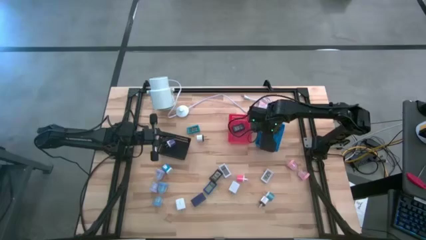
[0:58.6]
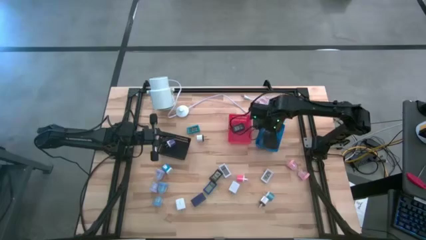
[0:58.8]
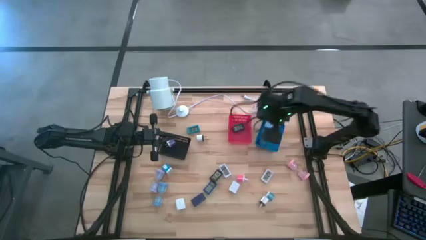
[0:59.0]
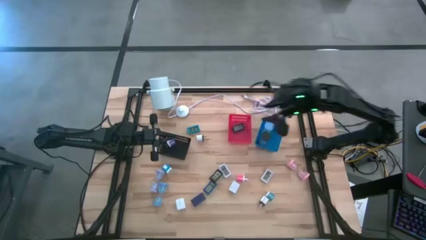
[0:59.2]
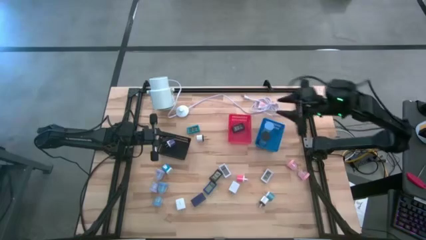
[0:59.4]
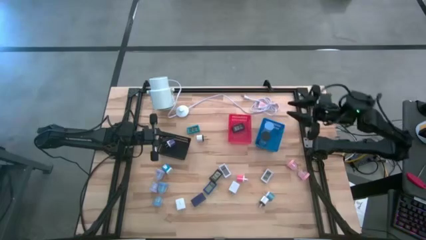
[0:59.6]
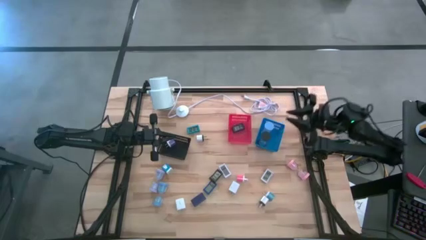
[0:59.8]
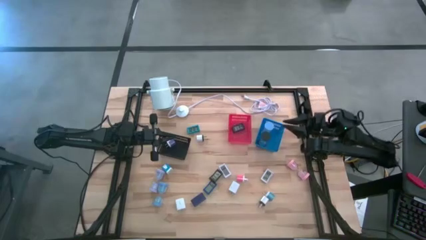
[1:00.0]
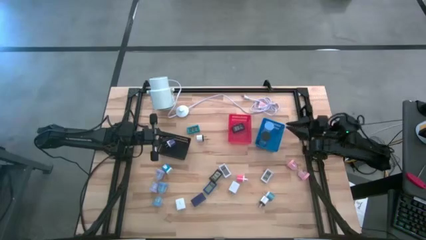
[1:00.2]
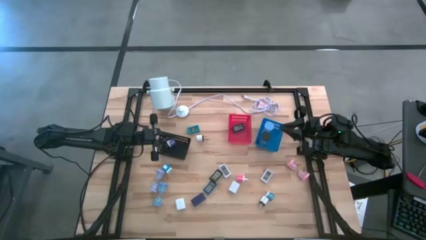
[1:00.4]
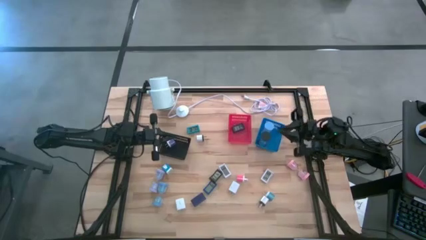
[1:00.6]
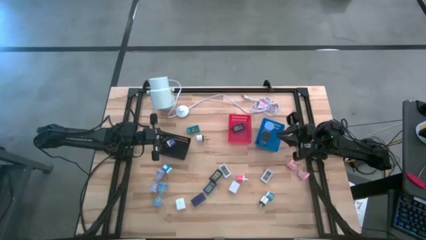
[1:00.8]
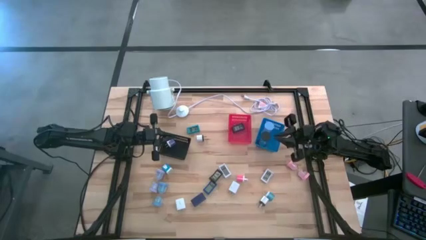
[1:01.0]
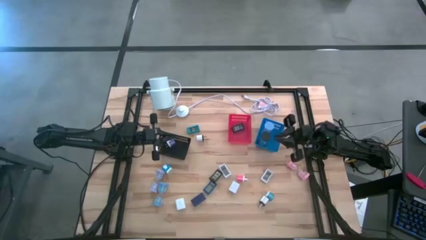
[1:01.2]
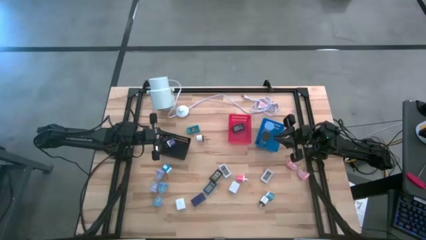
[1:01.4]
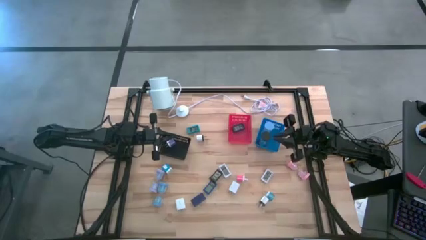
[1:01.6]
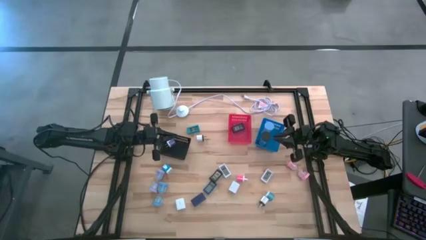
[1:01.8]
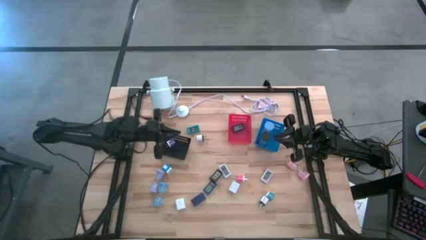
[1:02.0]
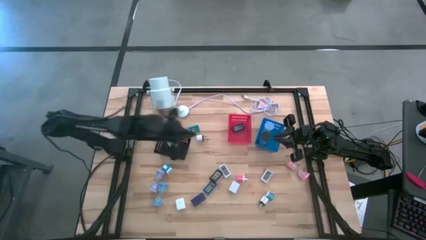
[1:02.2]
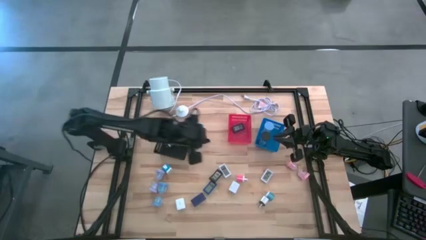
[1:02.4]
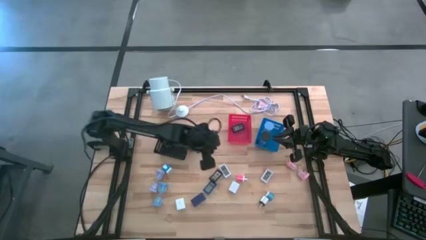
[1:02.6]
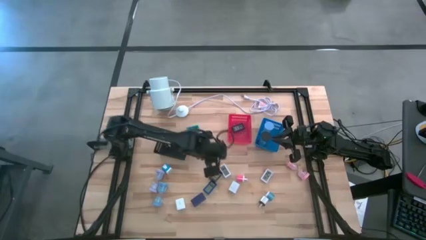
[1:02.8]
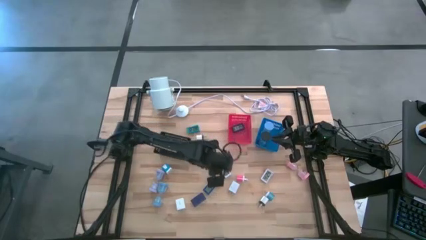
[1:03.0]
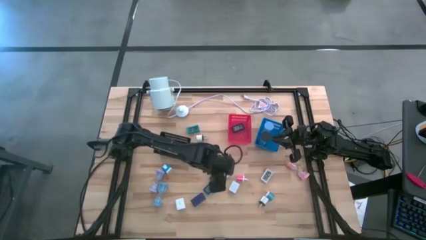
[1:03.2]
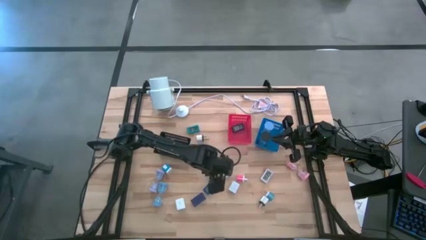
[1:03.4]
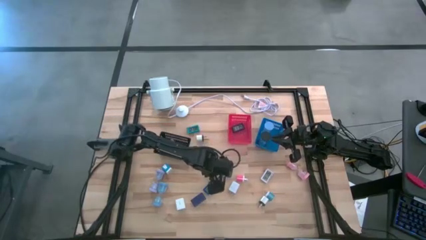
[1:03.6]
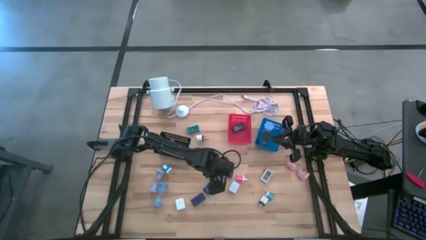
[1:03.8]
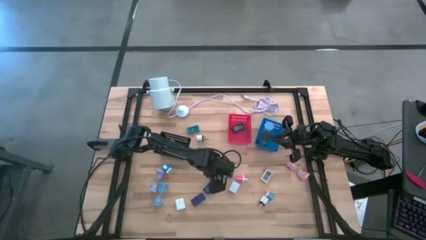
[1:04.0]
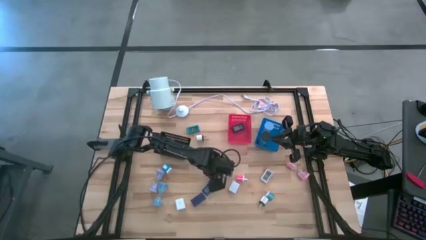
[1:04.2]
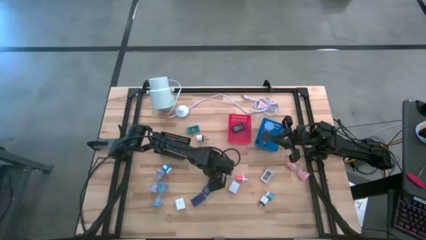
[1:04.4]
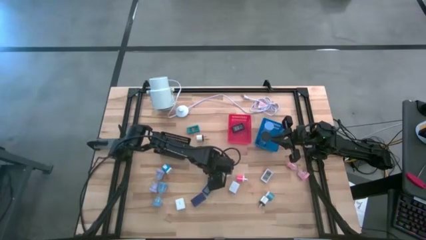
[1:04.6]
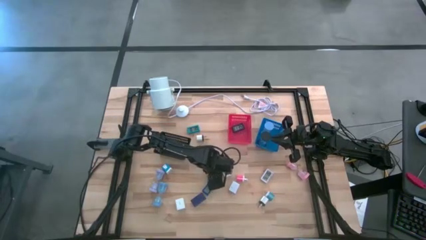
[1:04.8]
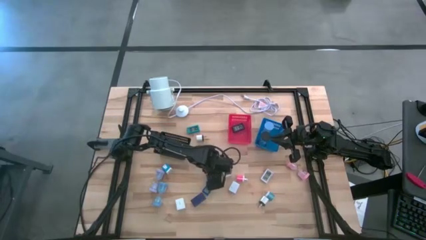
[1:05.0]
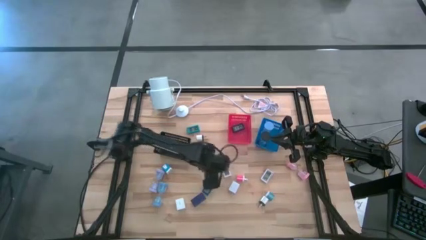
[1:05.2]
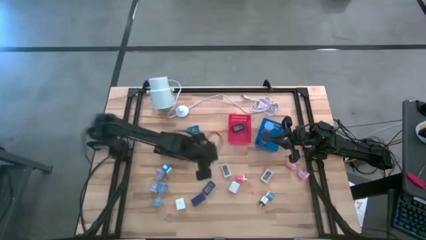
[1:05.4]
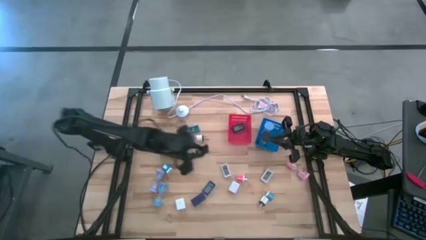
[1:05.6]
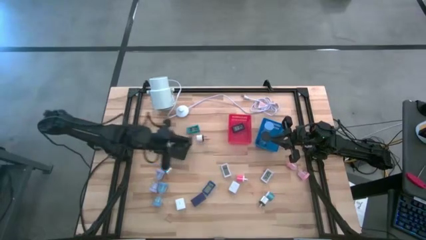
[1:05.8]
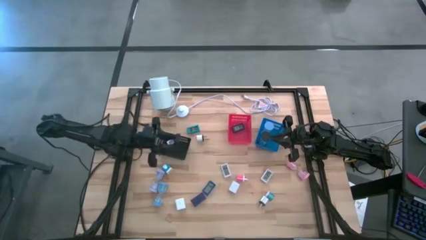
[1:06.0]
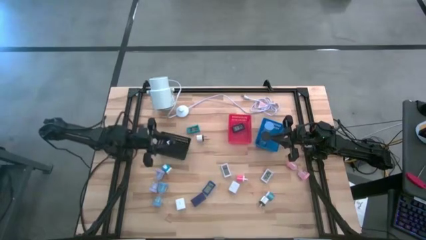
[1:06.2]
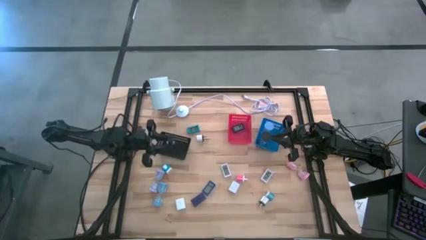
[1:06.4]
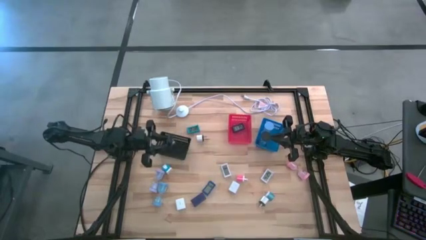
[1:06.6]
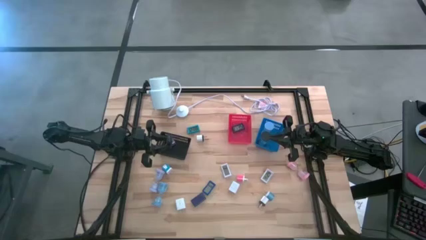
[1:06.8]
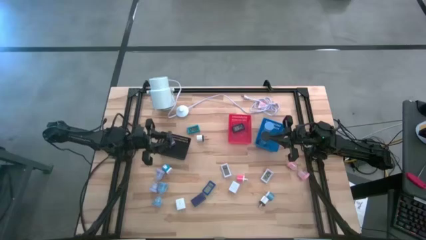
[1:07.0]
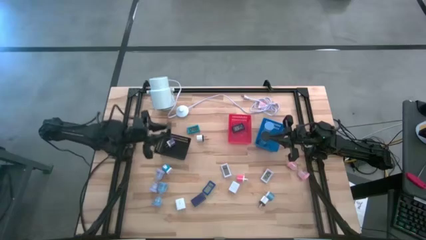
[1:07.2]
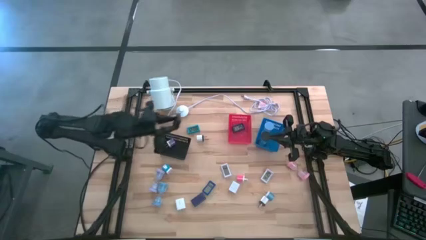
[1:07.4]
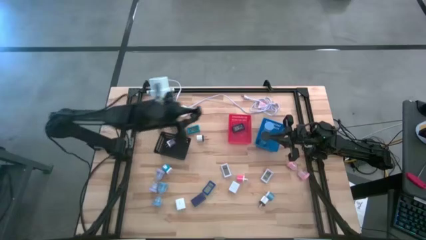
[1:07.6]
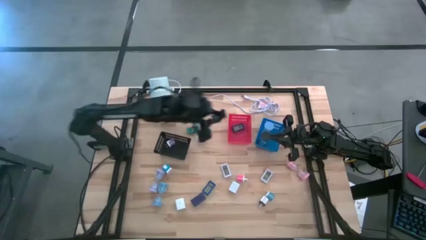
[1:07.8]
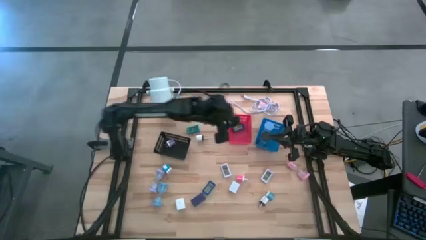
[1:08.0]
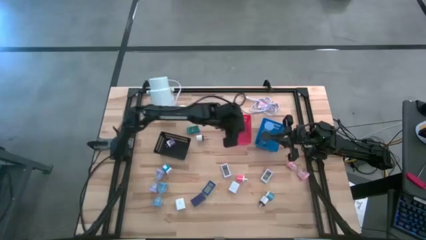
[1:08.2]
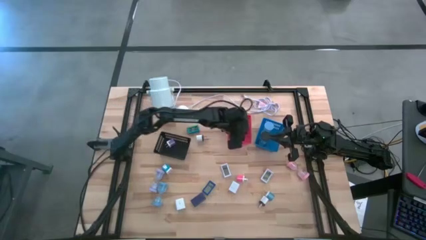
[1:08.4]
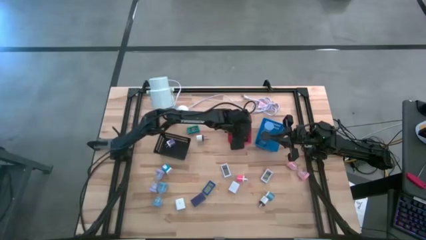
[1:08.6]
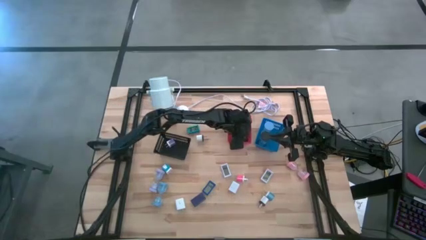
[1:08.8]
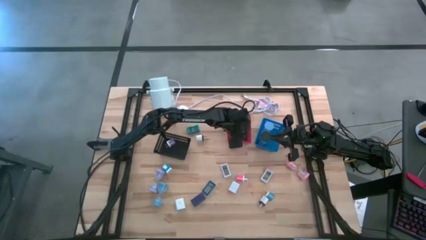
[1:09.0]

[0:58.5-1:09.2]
Task: Pick & Place Office items
Put the black digital clock into the red bin

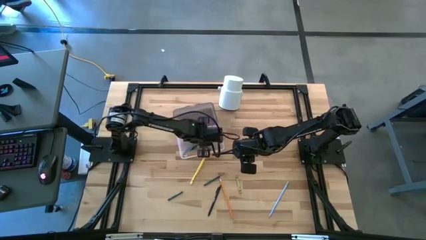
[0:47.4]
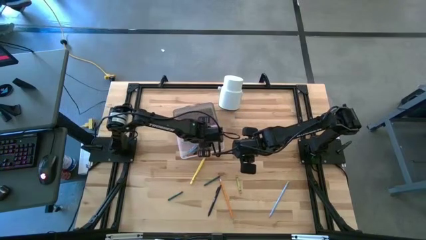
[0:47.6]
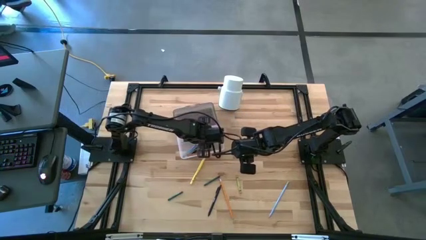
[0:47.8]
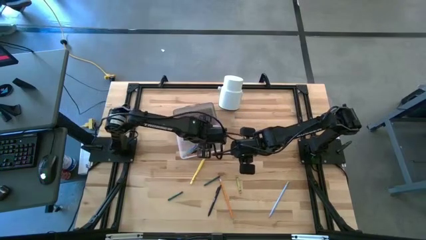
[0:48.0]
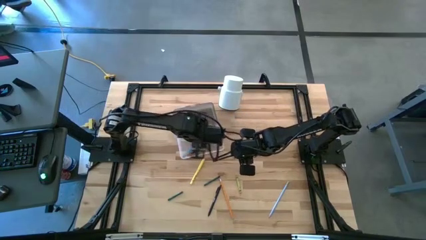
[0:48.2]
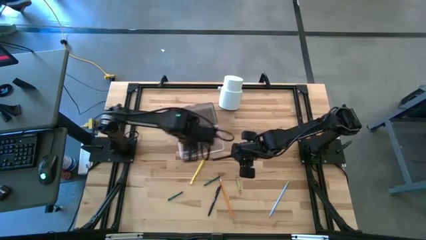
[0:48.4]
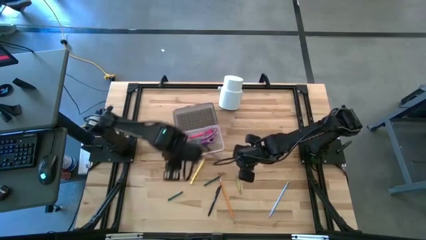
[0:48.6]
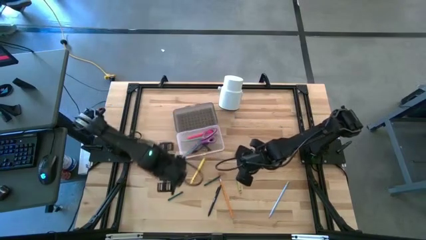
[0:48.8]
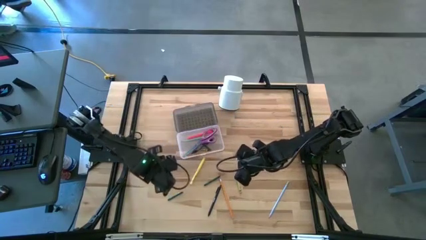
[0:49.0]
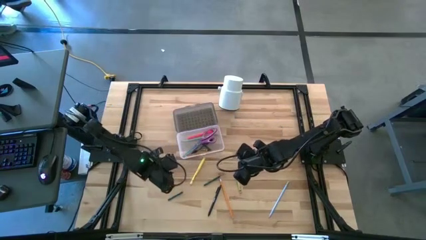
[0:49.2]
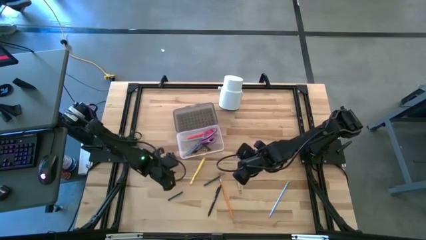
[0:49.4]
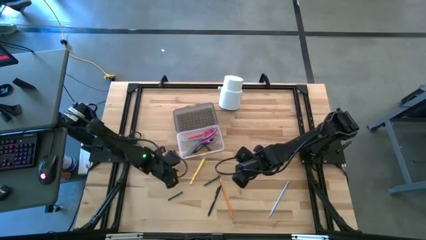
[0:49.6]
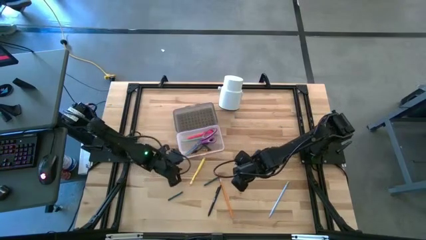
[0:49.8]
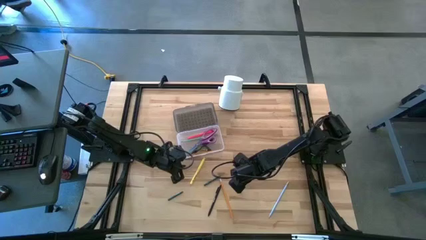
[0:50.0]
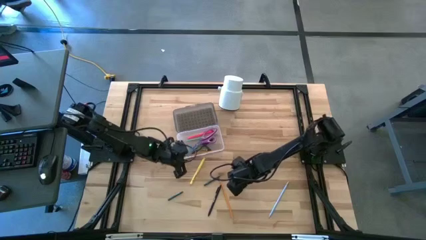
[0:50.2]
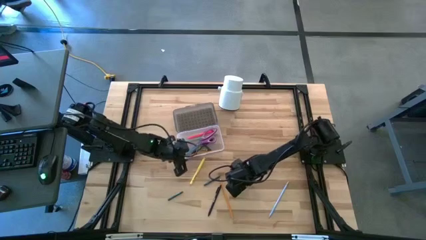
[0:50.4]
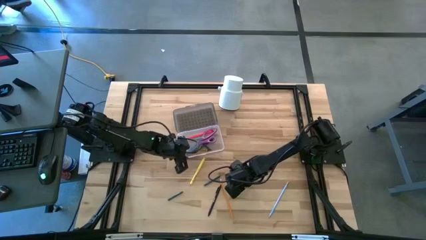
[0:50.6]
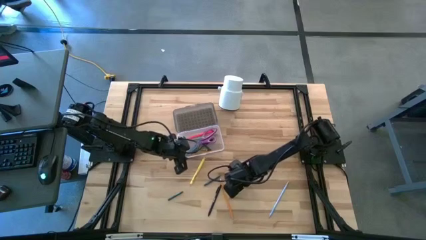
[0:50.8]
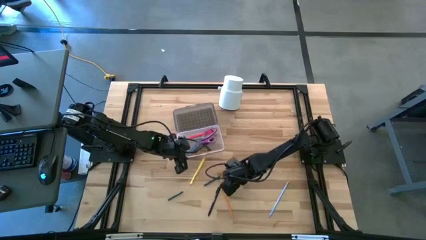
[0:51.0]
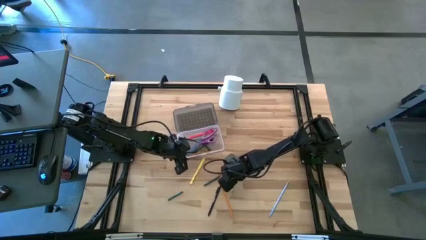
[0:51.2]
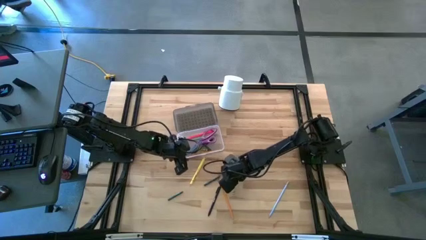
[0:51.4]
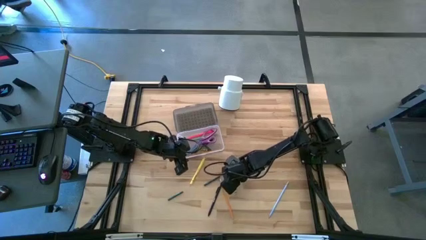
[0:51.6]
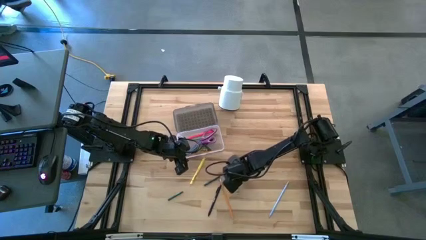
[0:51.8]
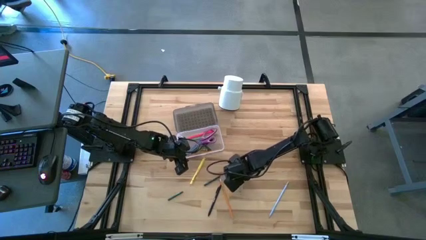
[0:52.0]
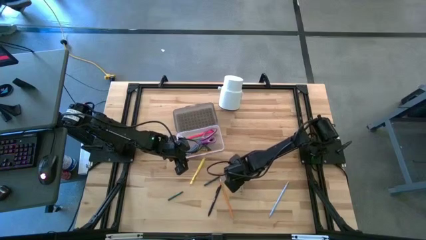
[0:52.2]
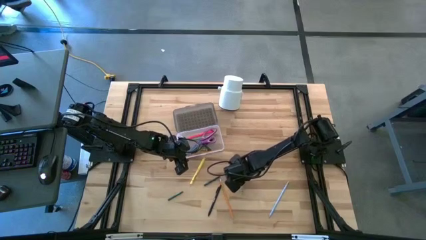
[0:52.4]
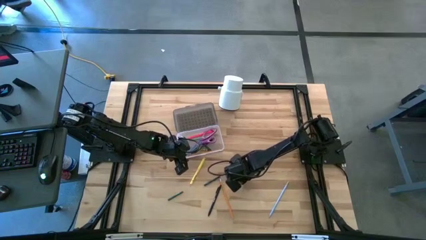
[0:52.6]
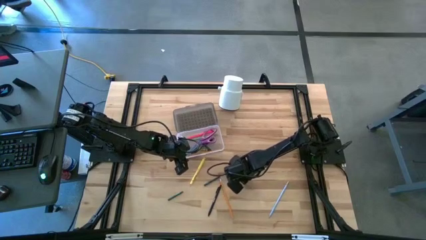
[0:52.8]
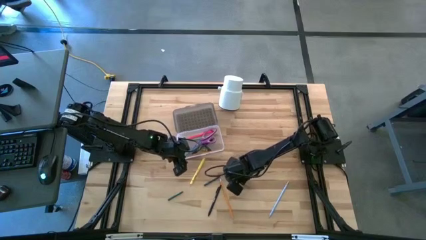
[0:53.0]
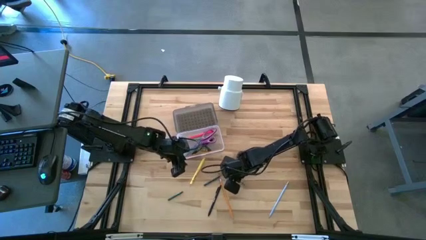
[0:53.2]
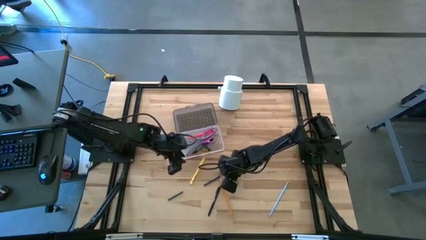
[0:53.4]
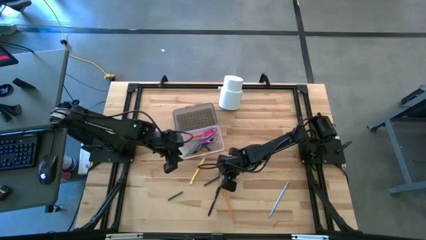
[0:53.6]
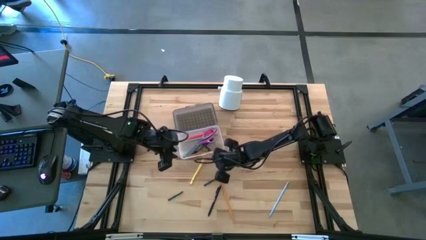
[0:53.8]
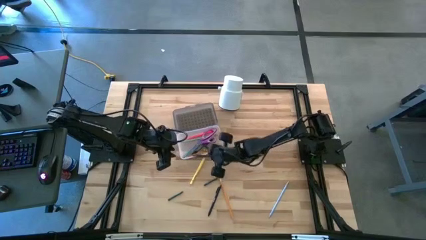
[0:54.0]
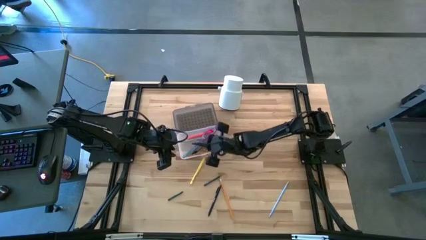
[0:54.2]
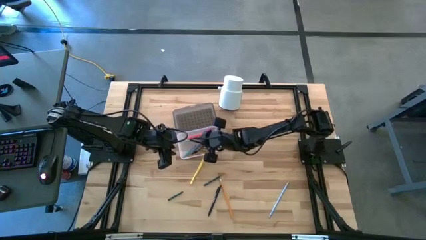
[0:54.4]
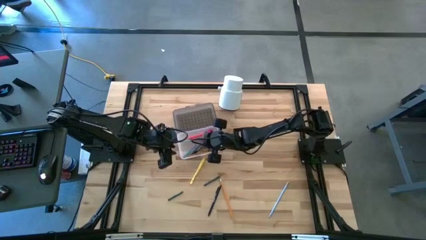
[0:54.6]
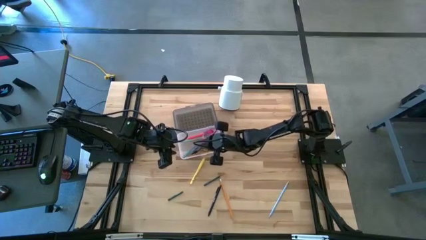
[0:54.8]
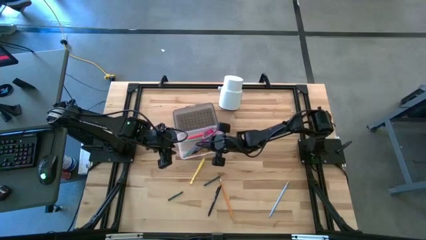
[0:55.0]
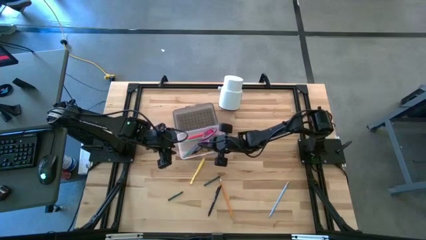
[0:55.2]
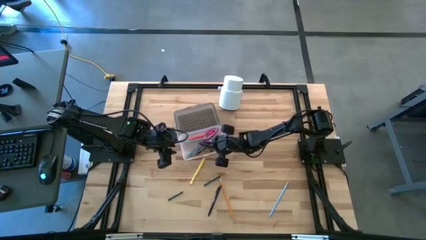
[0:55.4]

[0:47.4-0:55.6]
Task: Pick & place school supplies into a supply box
Put the light green crayon into the black supply box
